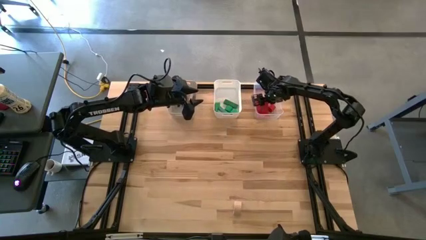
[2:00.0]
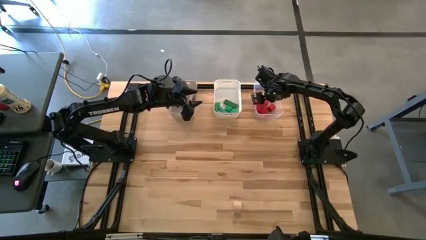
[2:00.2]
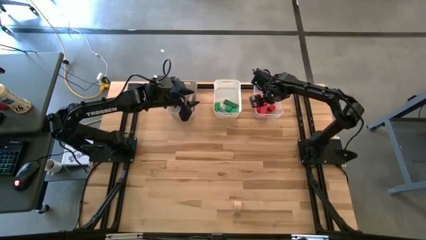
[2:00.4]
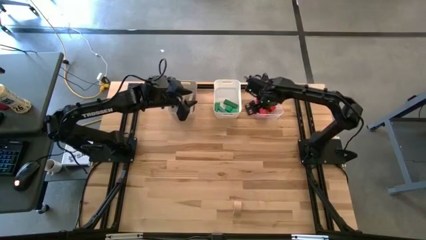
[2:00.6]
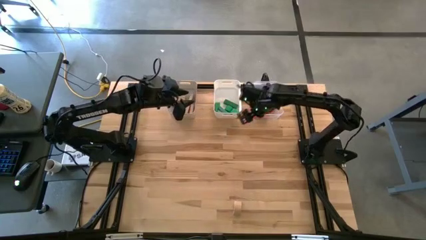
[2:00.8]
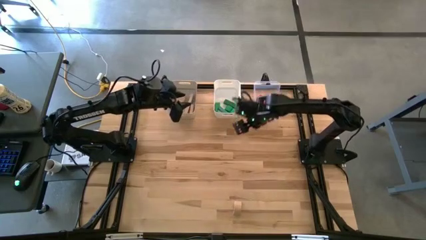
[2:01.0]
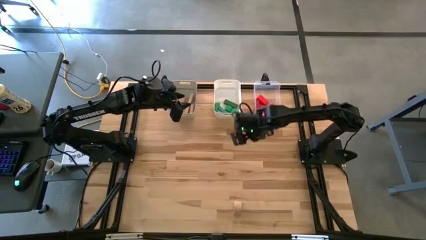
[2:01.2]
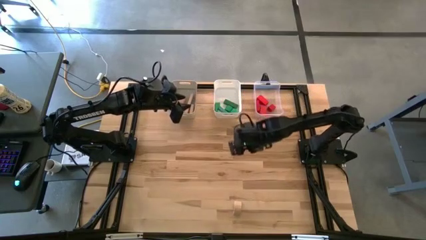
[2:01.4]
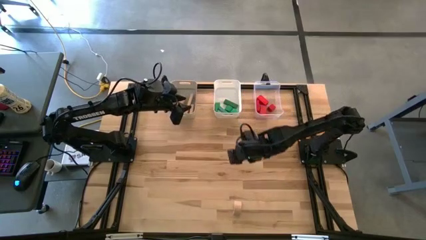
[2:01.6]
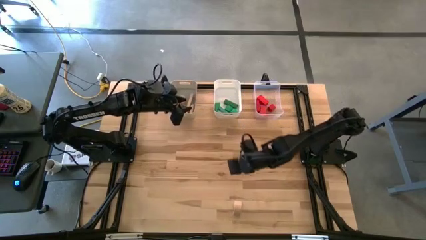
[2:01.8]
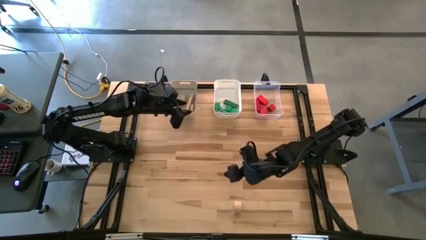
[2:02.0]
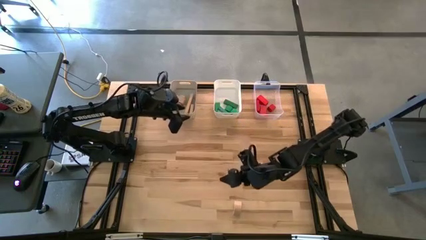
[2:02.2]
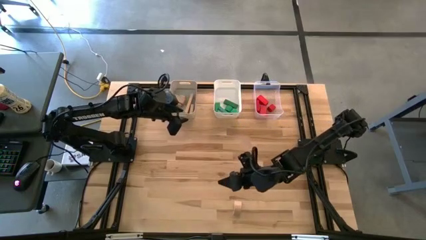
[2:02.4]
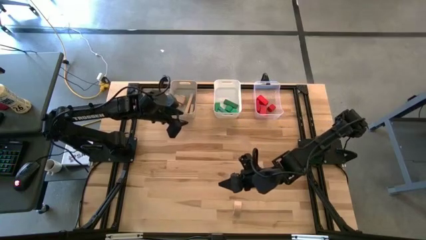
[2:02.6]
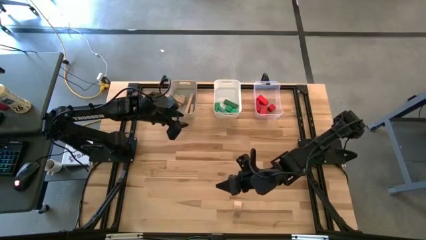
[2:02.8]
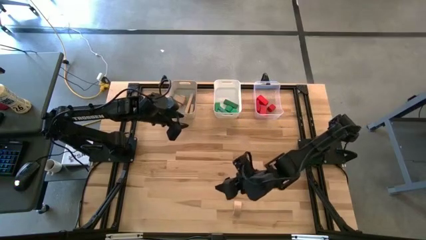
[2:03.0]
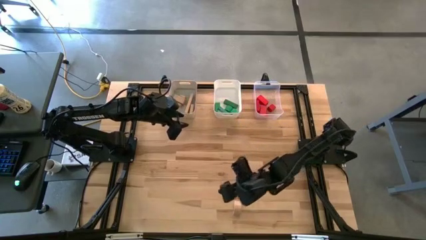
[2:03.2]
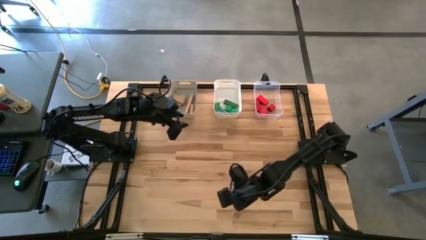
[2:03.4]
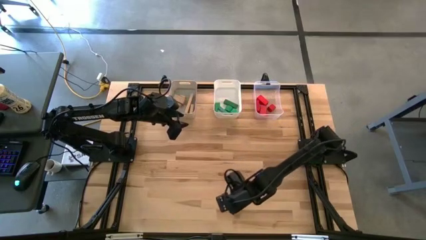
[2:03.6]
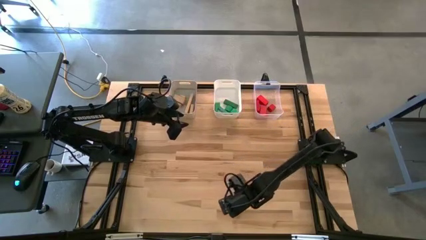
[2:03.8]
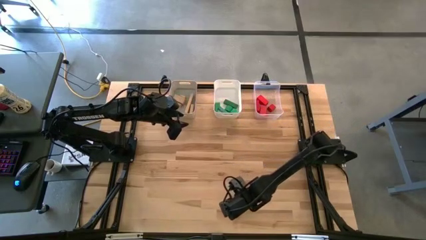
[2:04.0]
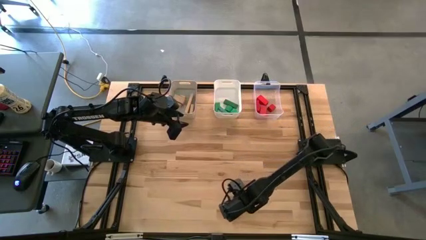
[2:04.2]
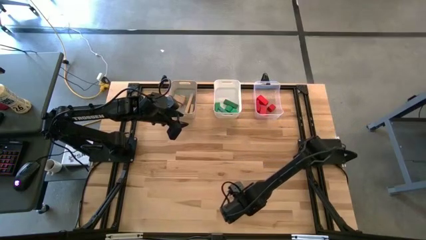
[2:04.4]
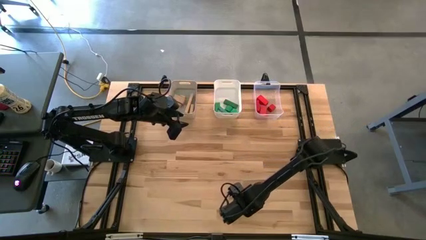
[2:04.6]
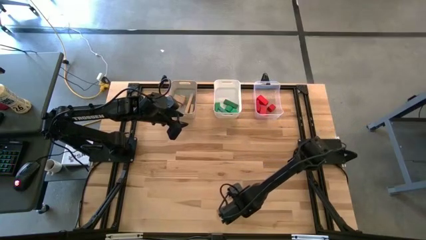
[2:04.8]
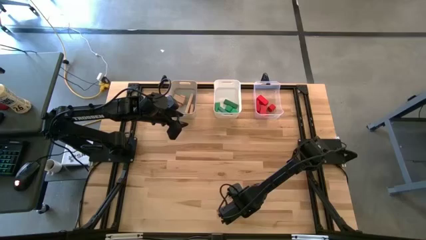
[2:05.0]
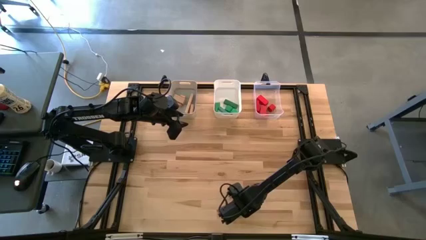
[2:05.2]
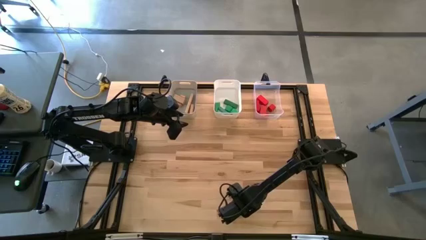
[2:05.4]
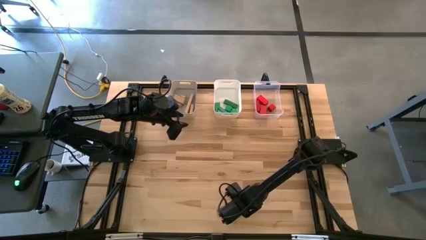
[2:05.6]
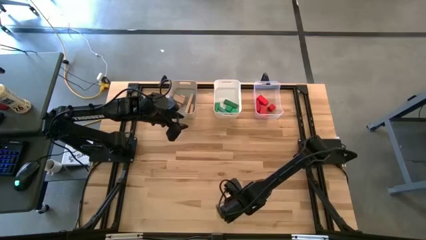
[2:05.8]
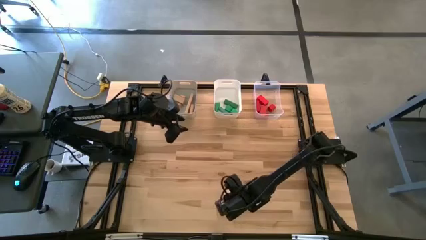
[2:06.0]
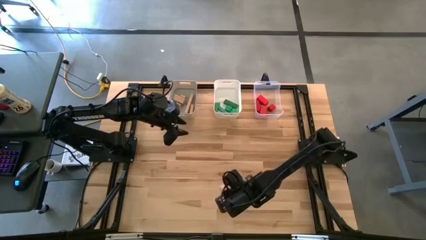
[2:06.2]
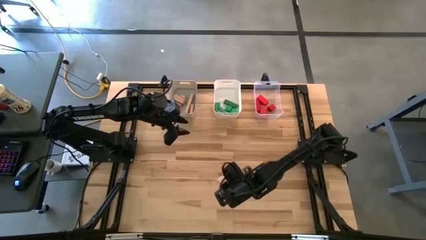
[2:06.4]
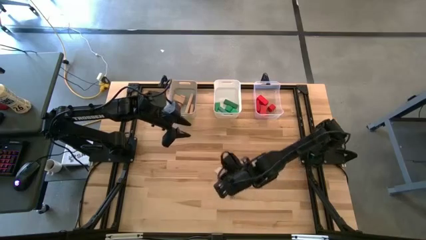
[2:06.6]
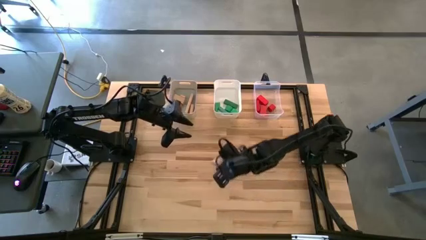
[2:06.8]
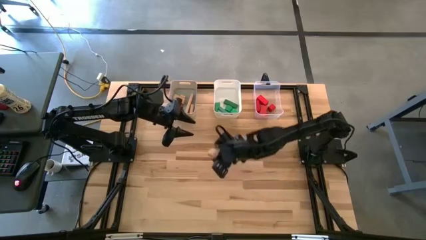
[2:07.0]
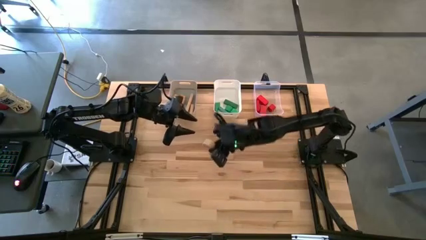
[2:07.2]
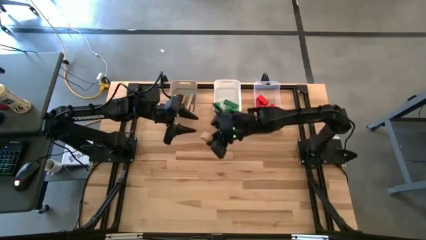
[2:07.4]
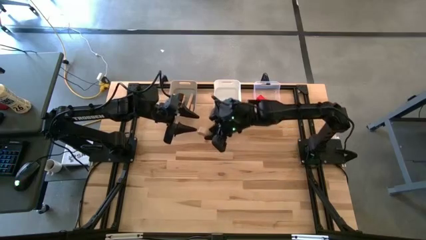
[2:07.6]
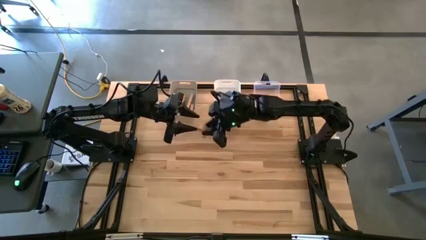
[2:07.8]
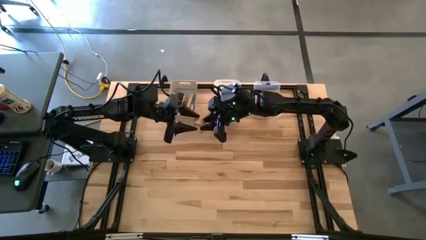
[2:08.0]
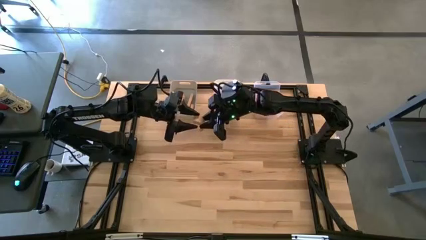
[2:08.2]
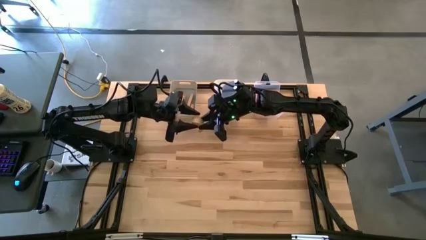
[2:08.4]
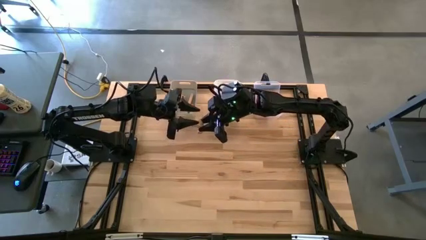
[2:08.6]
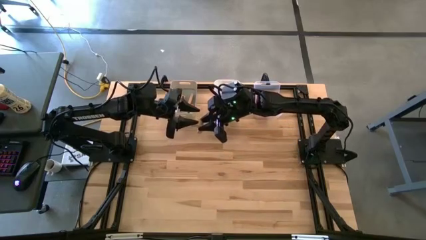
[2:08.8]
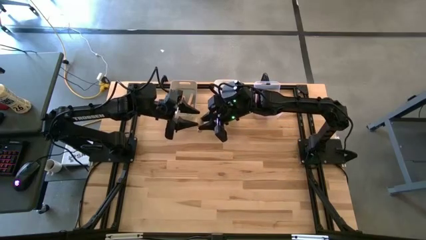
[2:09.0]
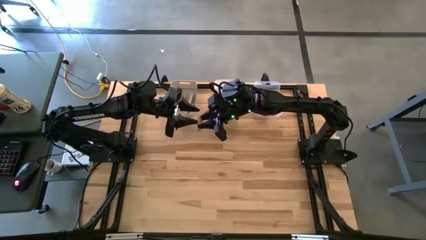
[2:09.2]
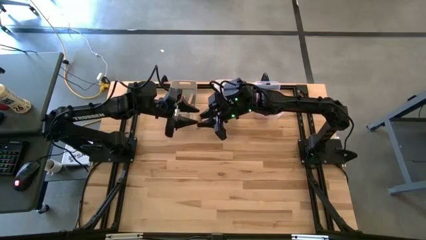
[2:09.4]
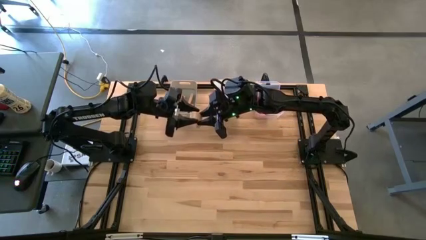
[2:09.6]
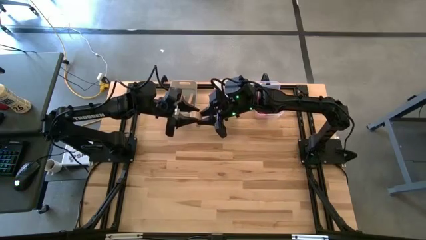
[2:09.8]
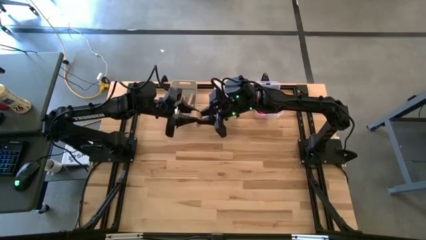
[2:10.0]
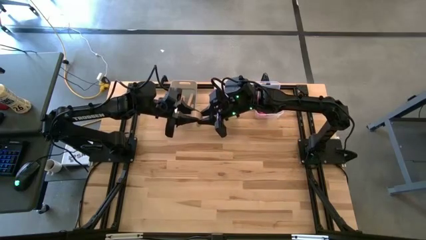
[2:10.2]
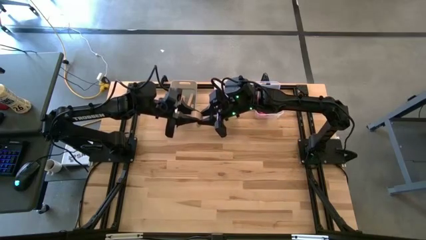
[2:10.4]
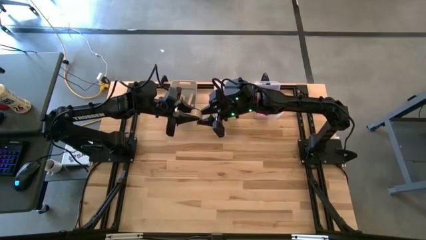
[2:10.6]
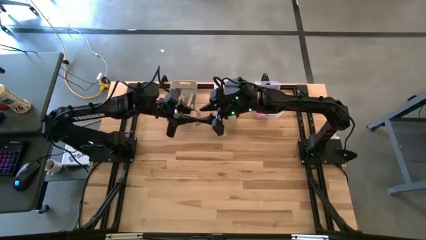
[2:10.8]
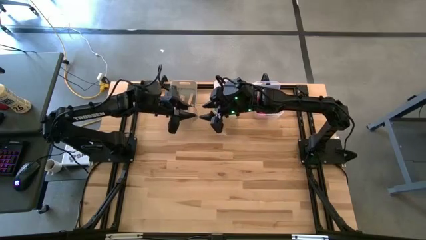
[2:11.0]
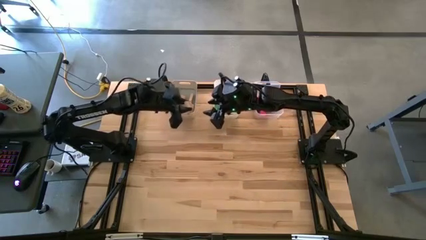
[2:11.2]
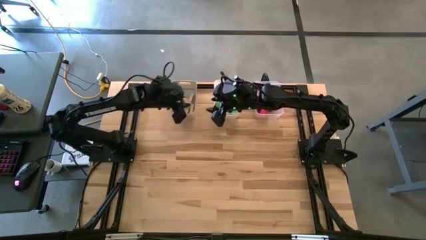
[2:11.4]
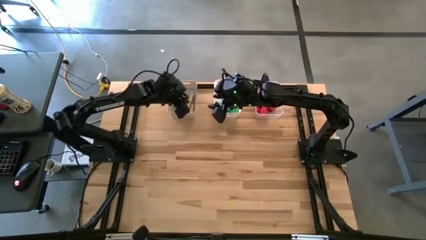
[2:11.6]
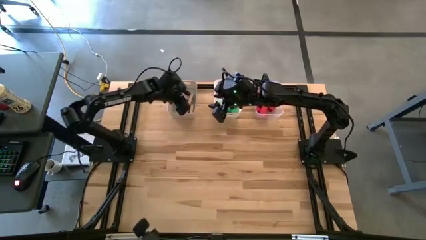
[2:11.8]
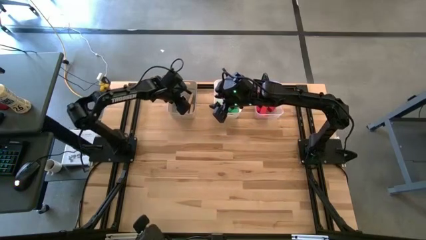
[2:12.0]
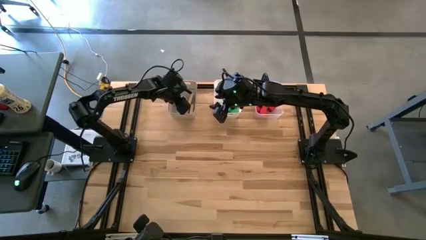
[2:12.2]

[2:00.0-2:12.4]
Task: Sort & place blocks by color
Put the brown arch block into the gray bin

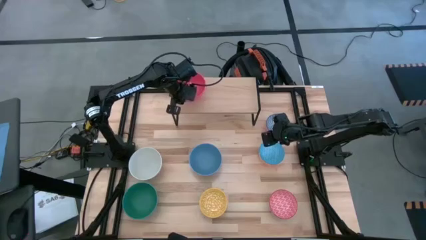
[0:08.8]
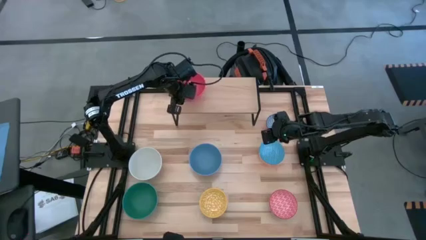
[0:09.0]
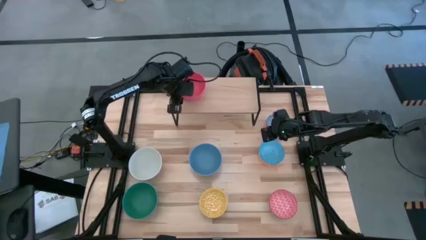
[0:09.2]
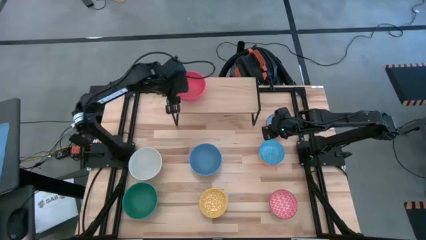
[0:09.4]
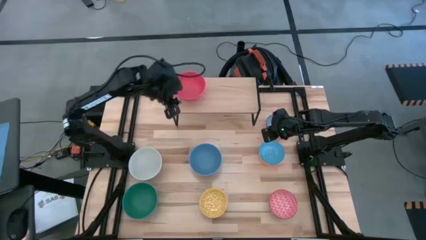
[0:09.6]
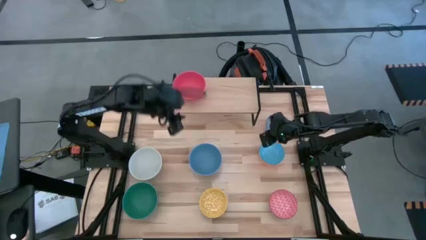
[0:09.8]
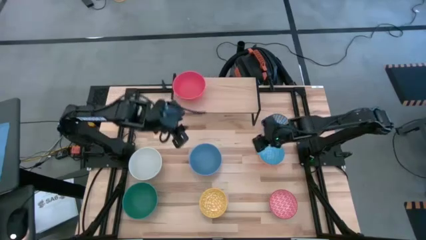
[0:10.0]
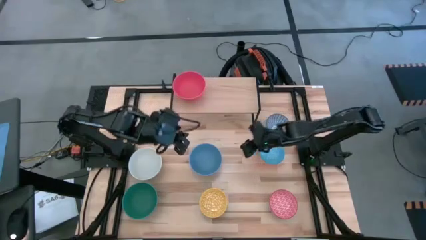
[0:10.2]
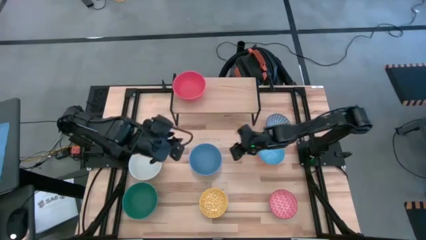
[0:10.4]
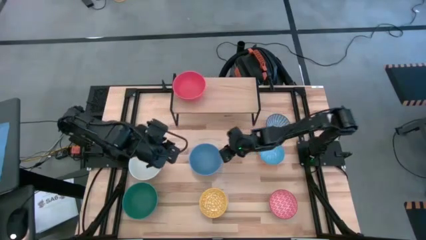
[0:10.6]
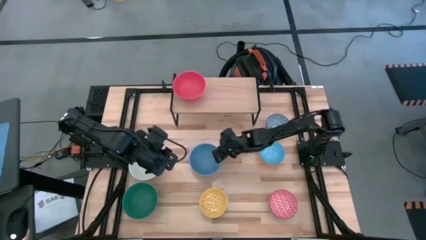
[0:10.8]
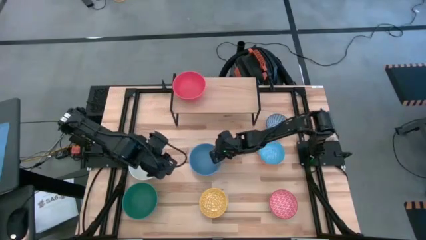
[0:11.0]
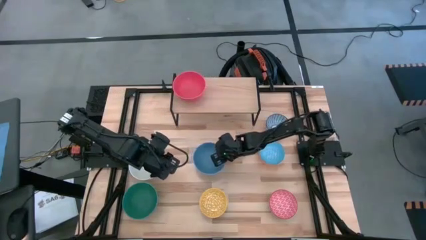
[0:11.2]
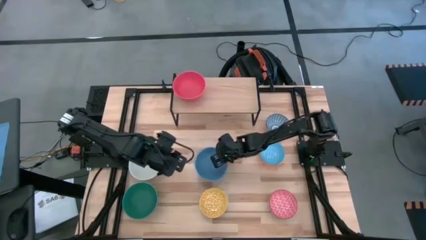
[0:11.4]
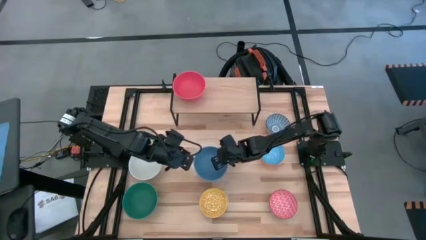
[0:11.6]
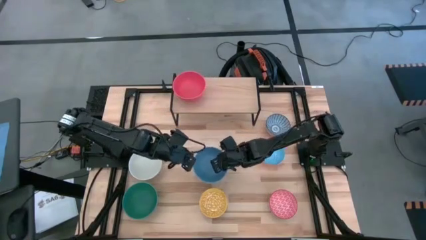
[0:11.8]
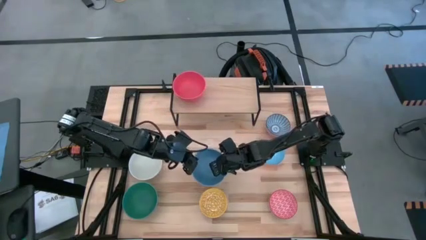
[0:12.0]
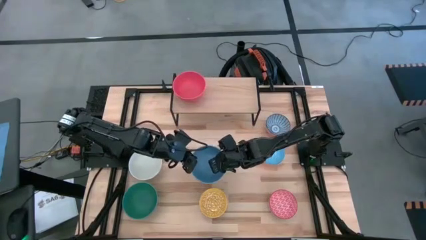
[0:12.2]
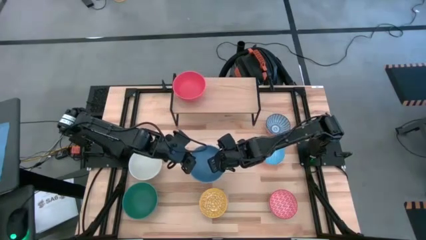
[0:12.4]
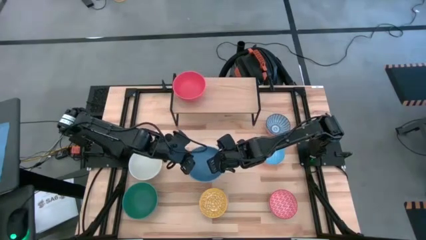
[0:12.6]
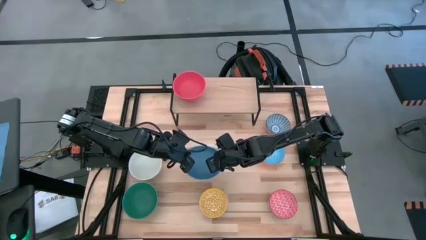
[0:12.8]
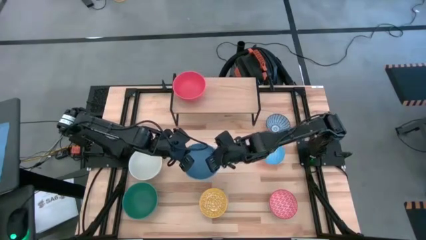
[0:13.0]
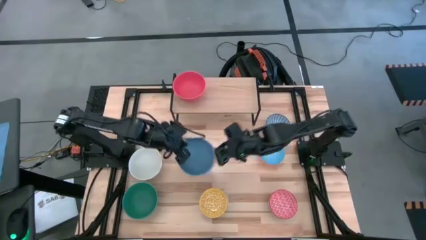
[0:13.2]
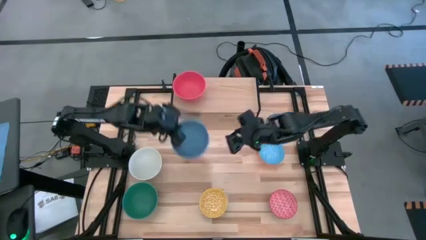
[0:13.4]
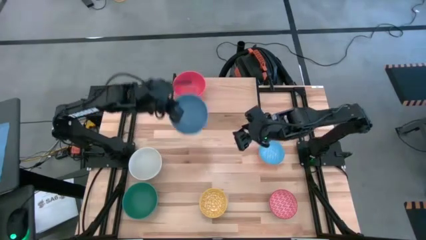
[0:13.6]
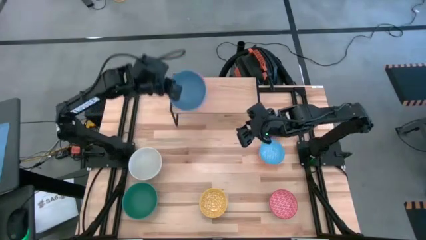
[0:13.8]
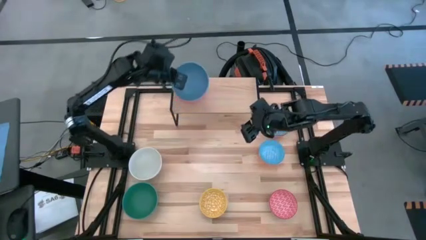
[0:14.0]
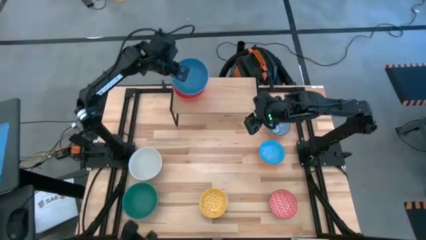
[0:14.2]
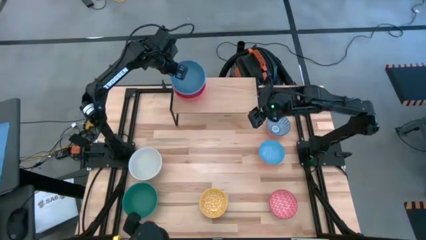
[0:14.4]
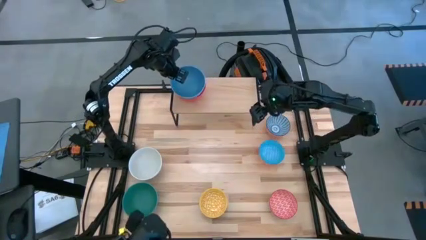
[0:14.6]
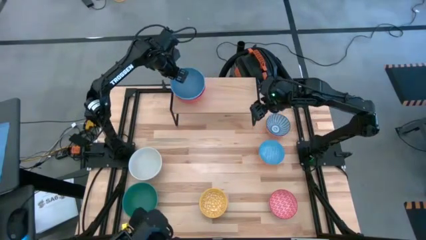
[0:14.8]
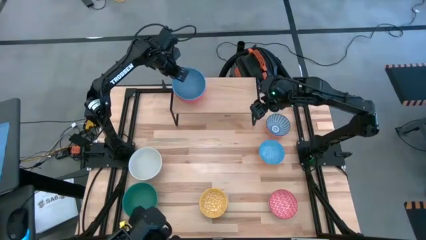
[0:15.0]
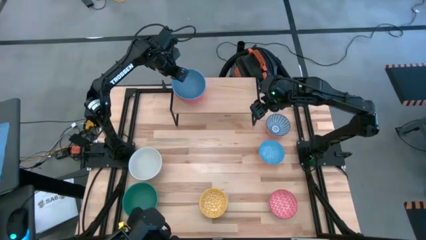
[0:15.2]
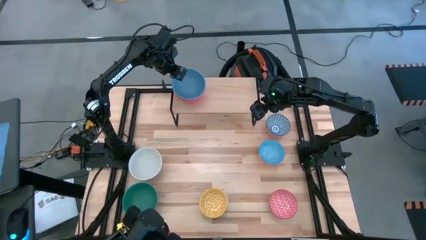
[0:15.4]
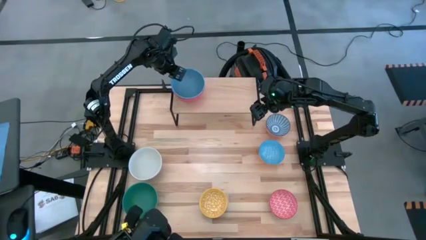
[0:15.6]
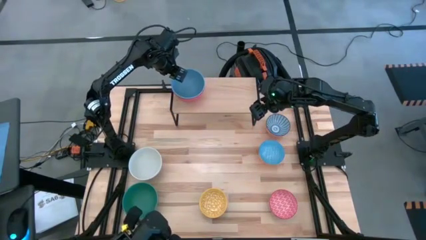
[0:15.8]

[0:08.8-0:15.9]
Task: Place and stack bowls onto a shelf
Stack the blue bowl on top of the orange bowl on the shelf
